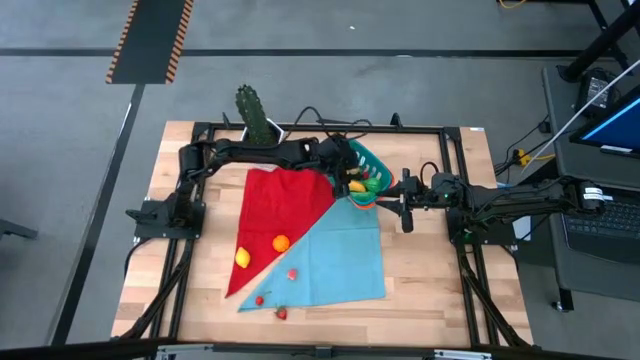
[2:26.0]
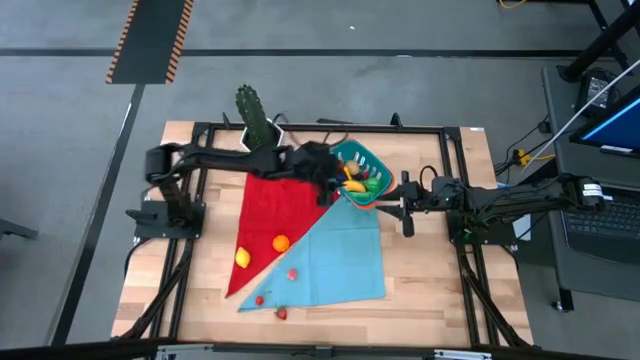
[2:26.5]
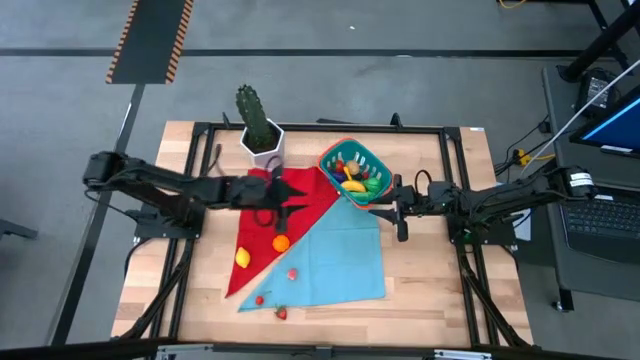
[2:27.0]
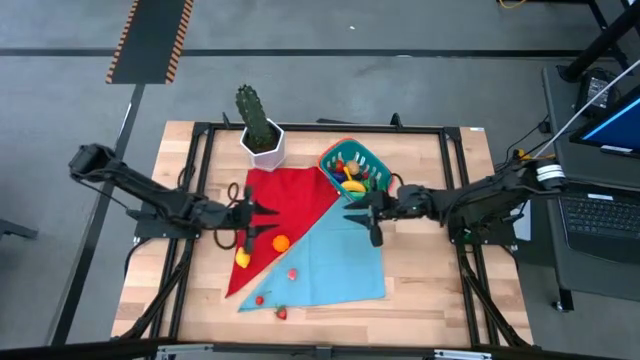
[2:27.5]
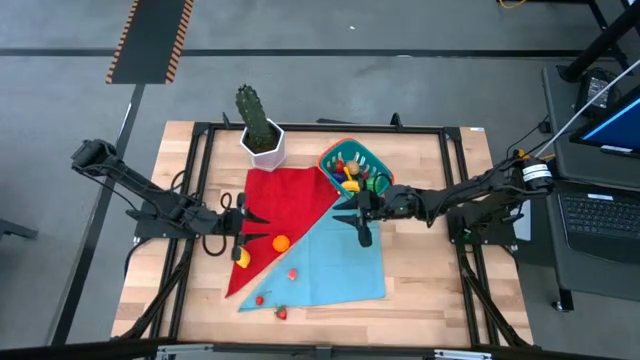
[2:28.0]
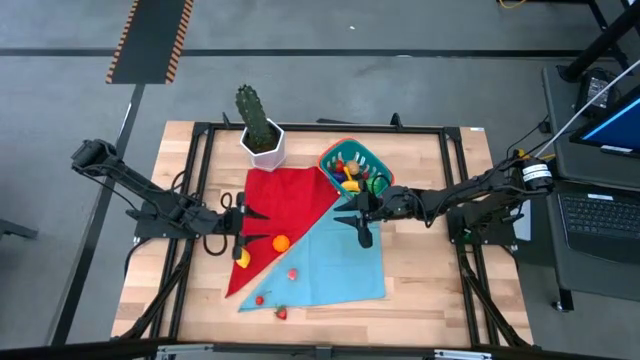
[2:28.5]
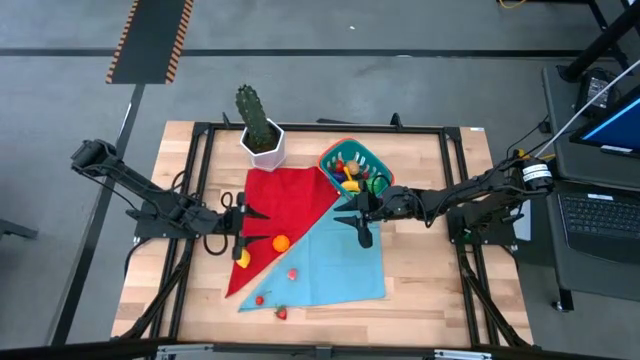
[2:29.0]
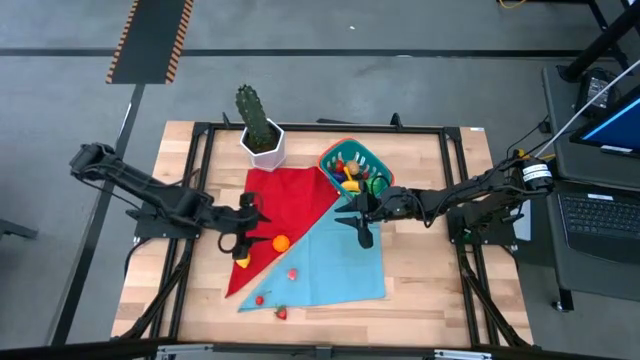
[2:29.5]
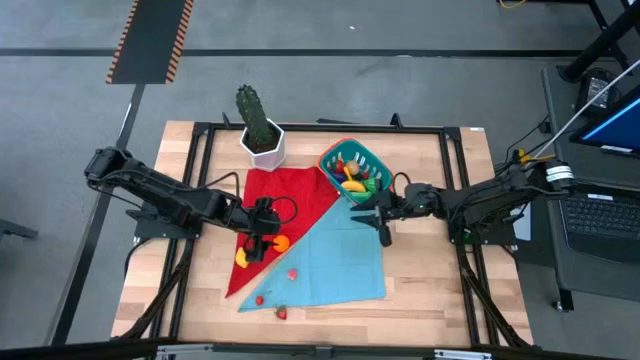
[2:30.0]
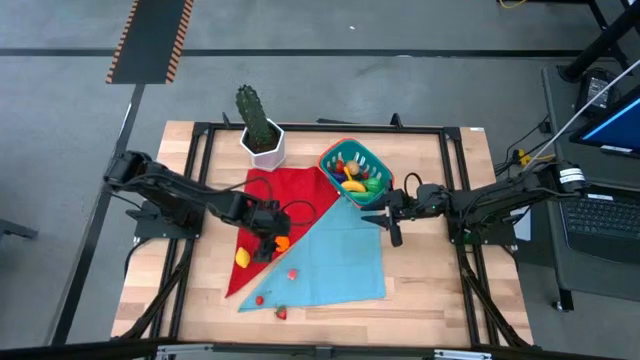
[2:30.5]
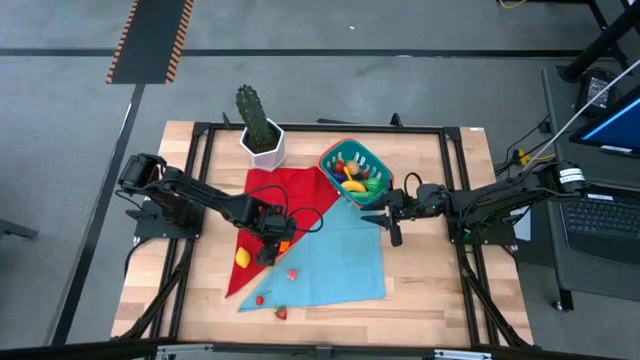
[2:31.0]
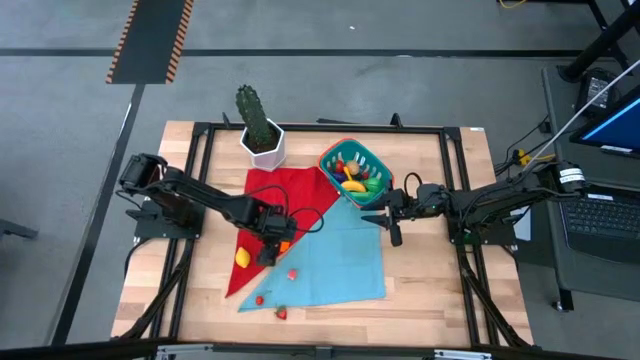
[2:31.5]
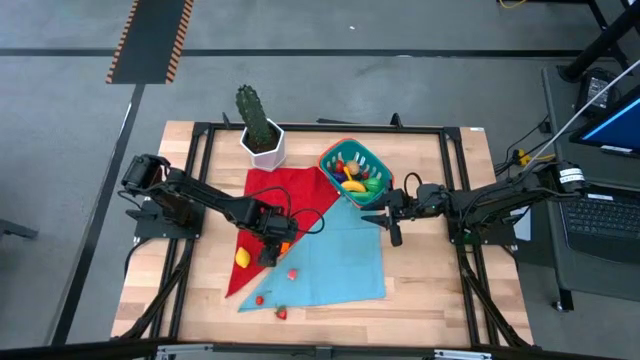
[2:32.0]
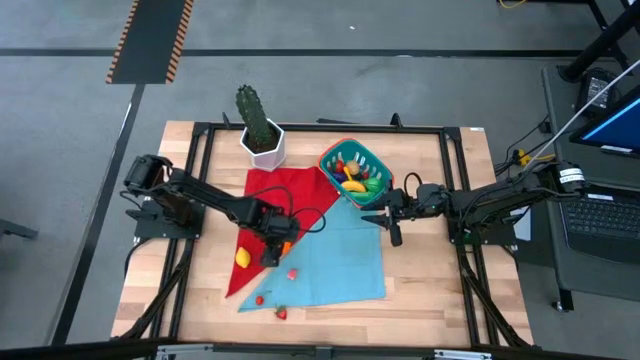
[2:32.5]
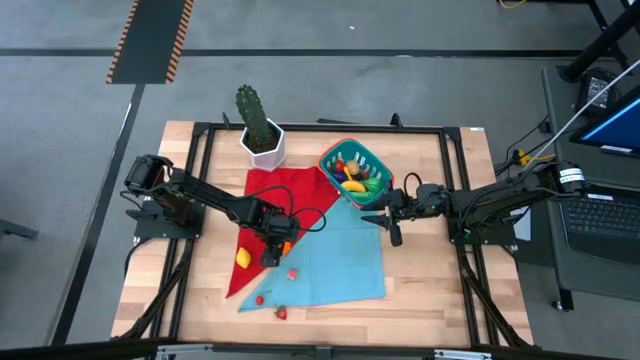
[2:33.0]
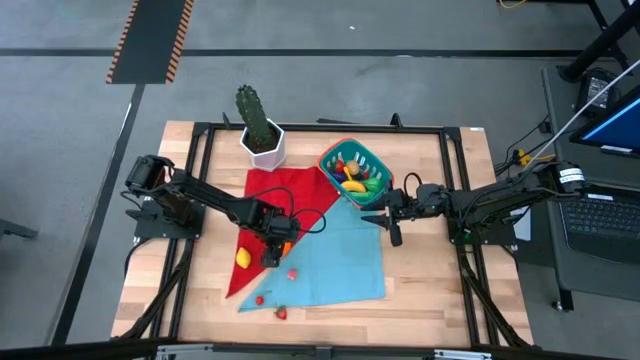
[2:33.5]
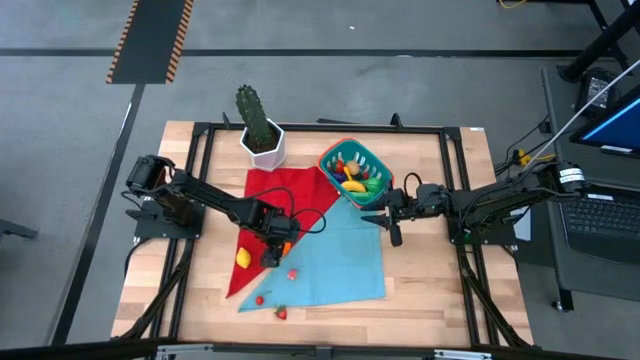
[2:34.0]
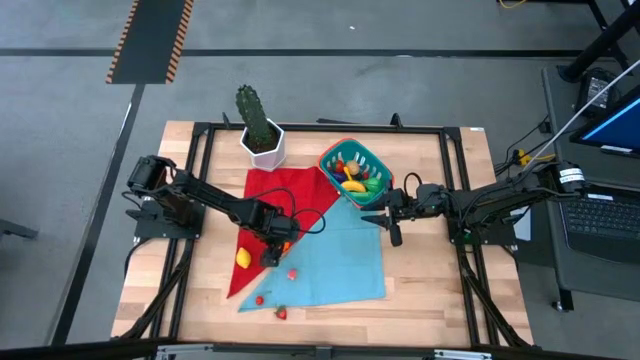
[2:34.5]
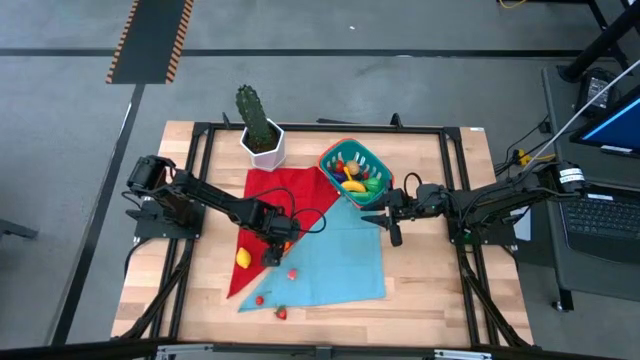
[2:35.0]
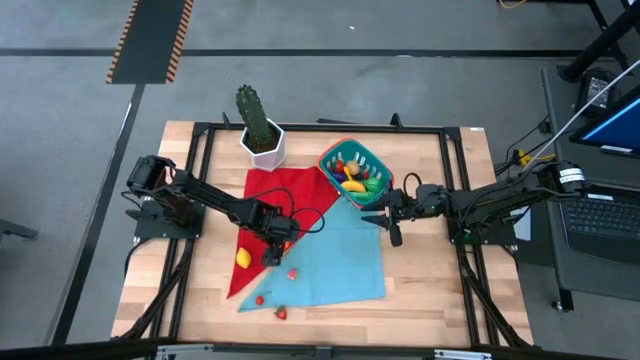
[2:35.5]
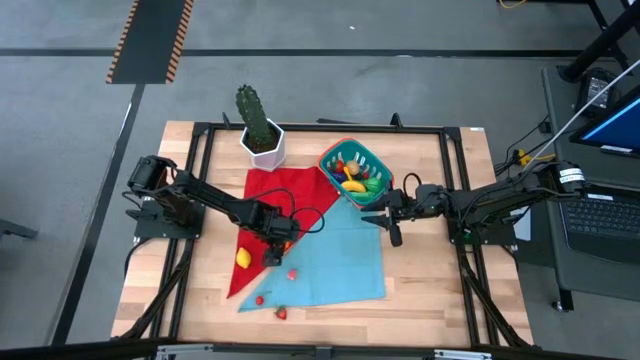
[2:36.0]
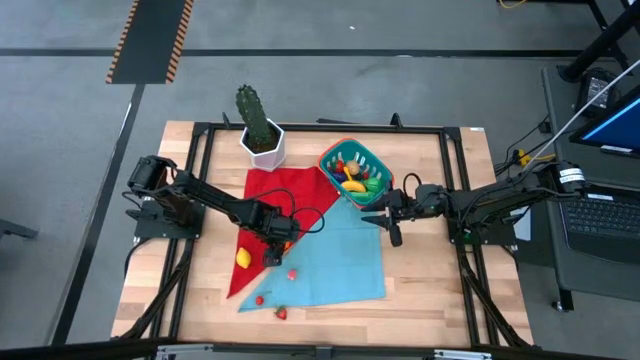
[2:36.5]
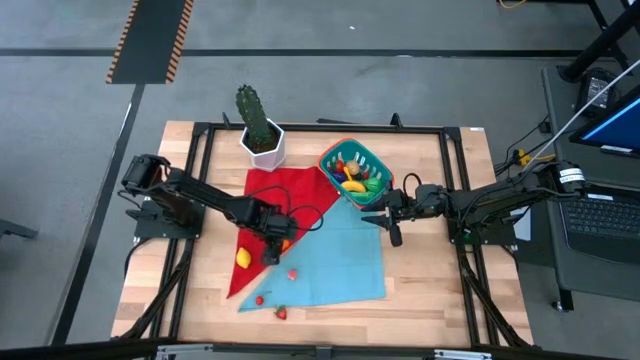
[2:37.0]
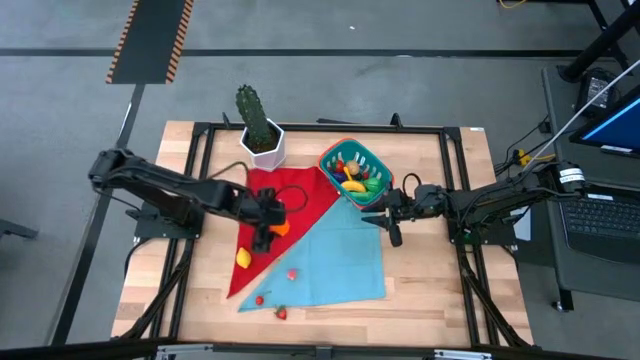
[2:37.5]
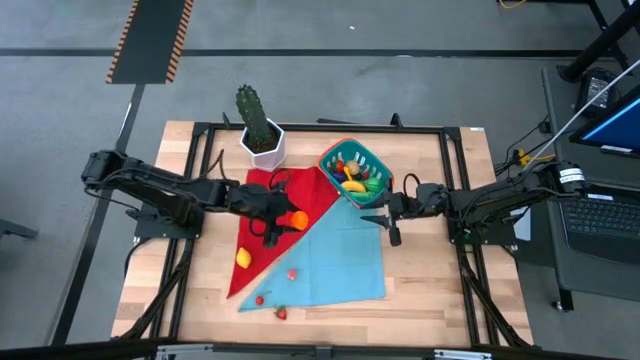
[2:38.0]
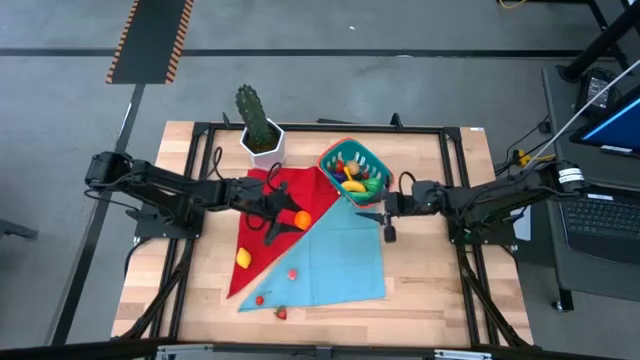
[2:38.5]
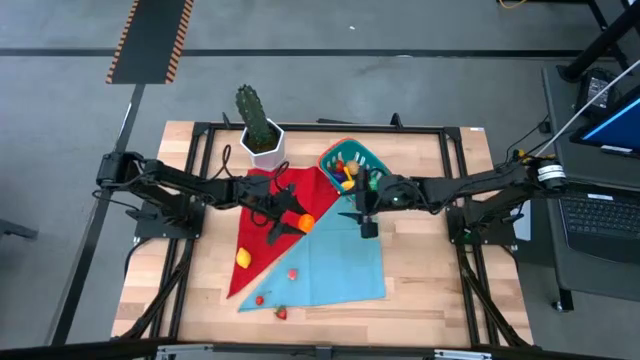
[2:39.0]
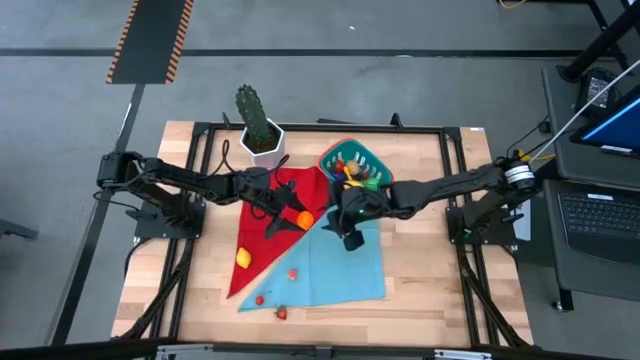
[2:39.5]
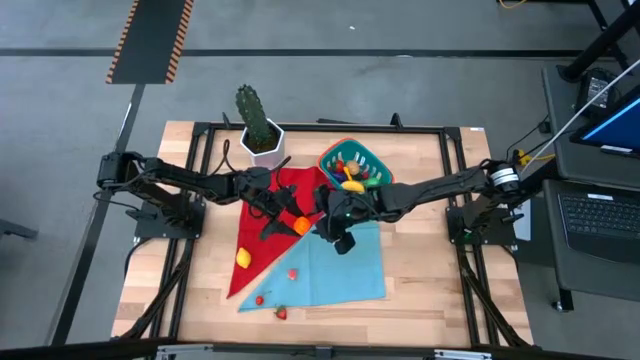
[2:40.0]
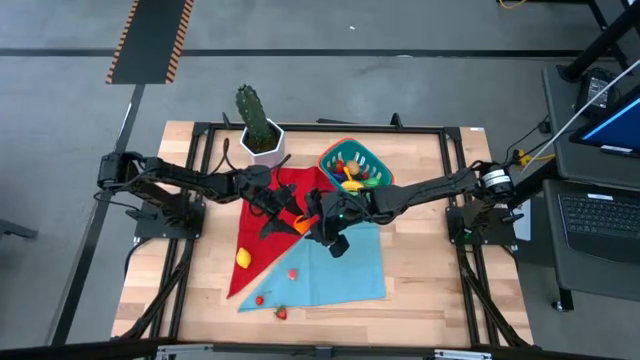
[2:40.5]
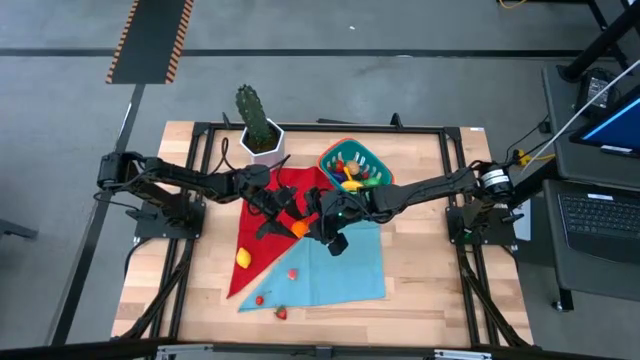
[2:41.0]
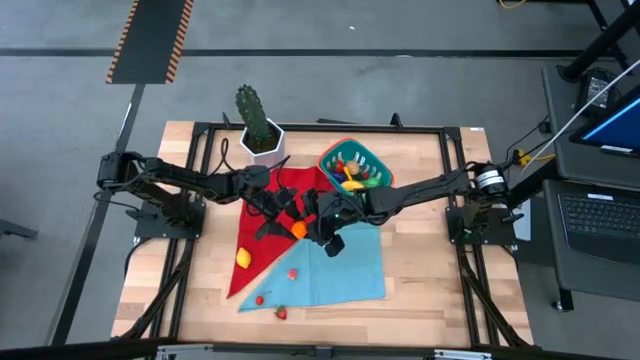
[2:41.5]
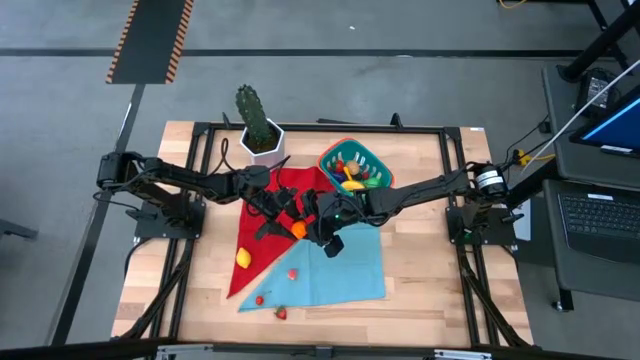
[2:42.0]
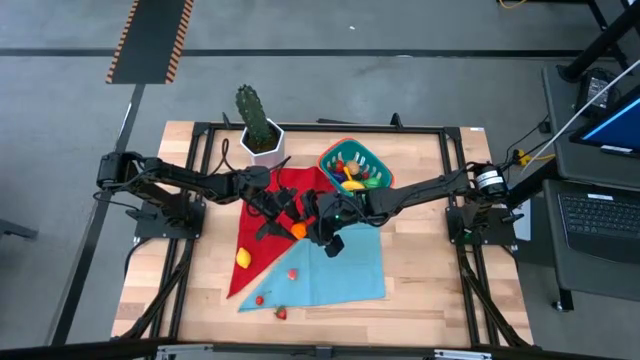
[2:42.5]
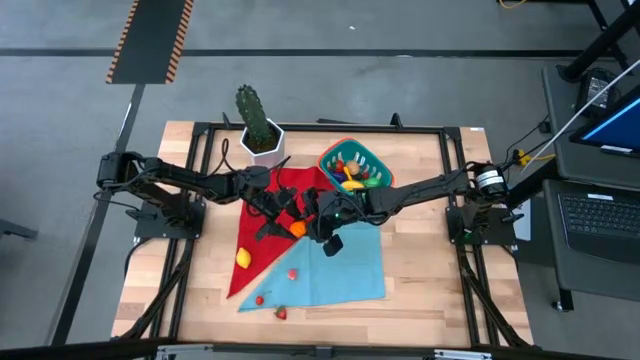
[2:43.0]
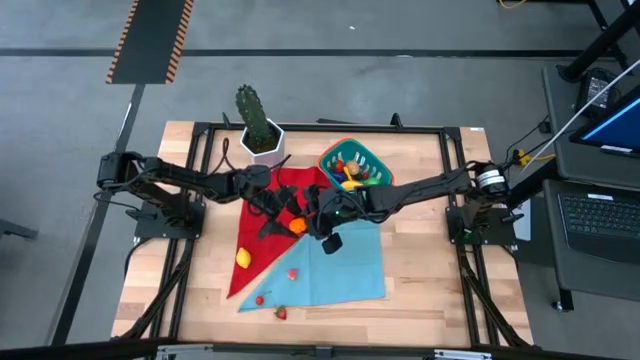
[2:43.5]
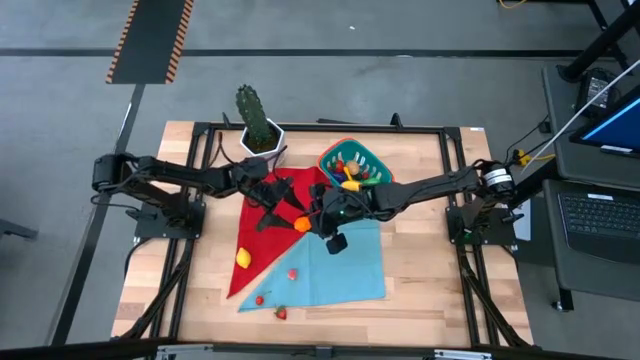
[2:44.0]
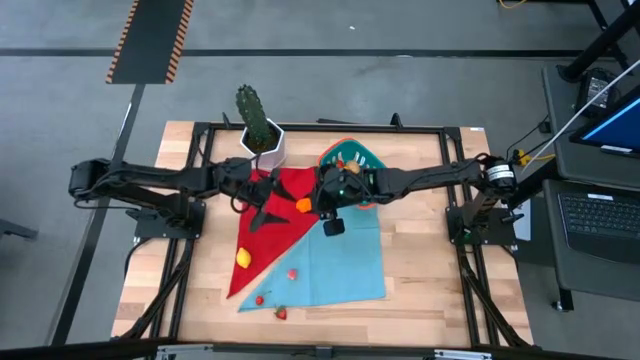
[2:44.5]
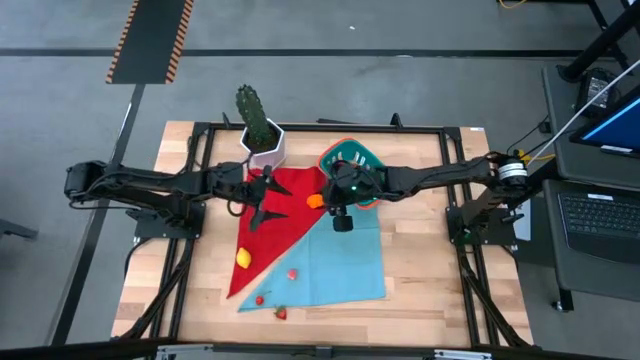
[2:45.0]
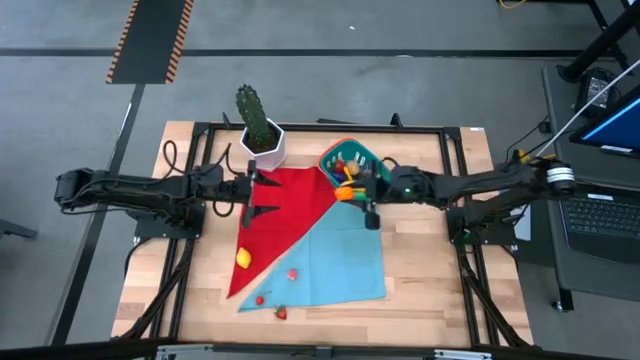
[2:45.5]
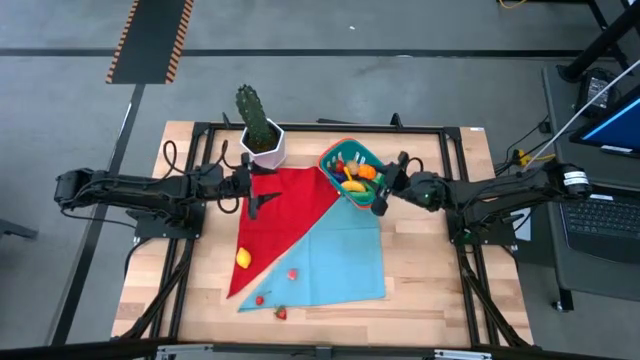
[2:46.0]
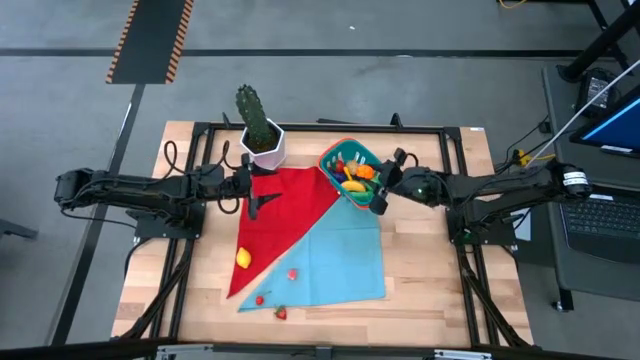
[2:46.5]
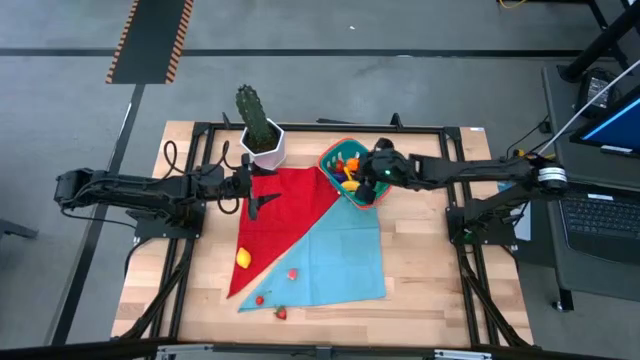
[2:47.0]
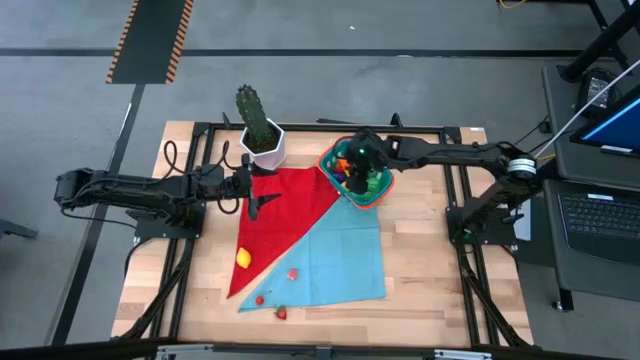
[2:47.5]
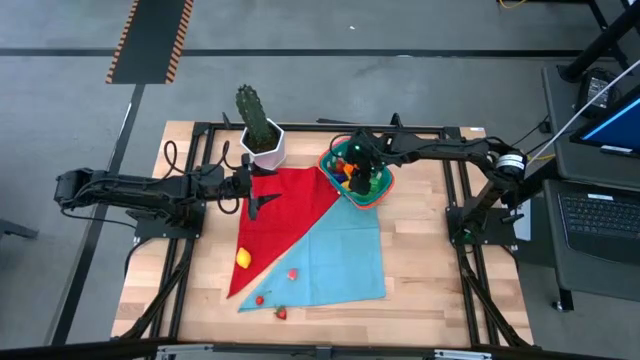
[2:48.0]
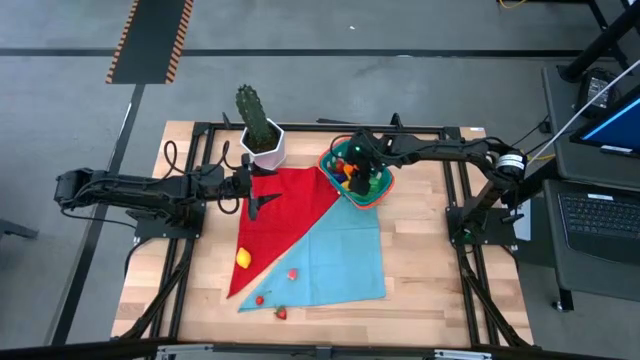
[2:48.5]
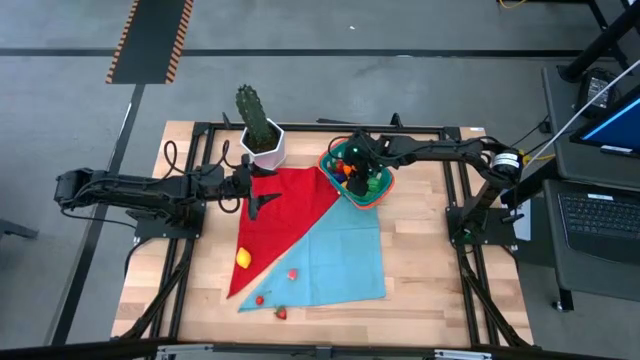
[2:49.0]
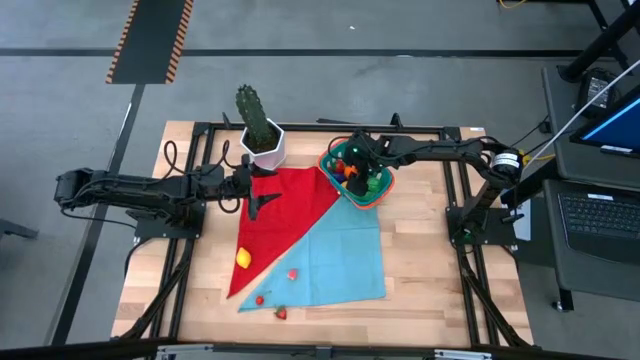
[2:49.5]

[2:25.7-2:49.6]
Task: Build produce basket
Put the orange pumpkin into the blue basket
